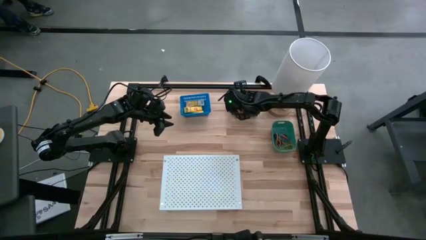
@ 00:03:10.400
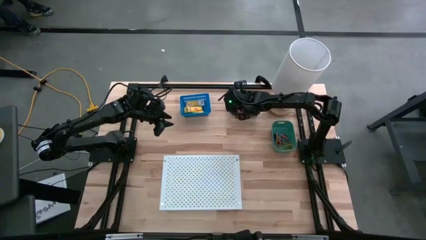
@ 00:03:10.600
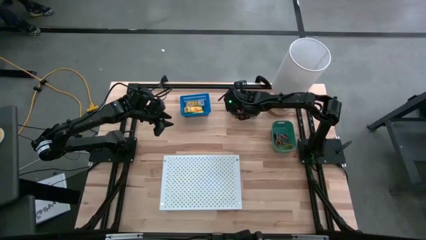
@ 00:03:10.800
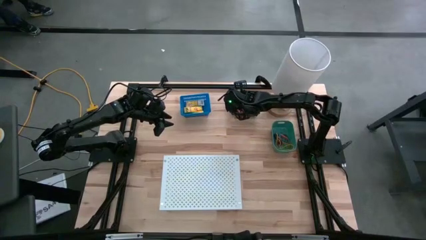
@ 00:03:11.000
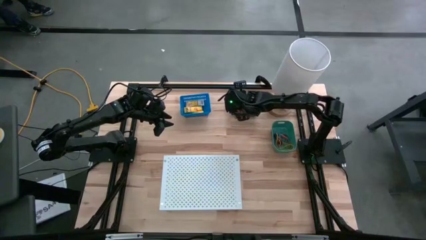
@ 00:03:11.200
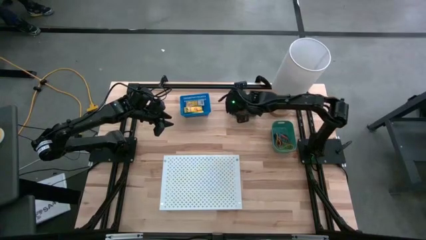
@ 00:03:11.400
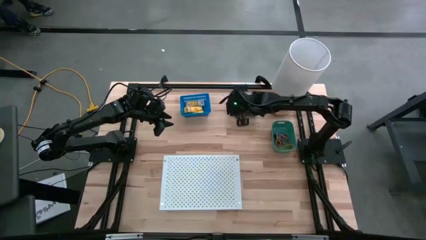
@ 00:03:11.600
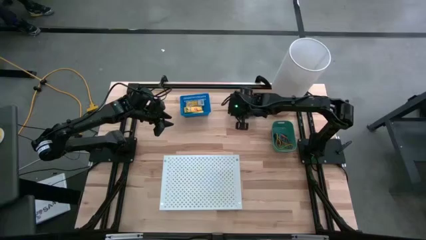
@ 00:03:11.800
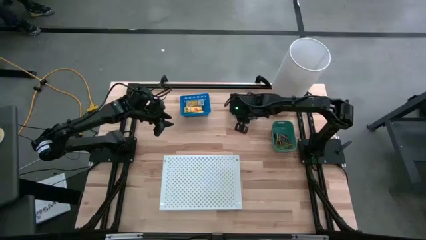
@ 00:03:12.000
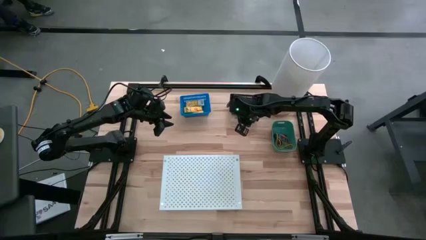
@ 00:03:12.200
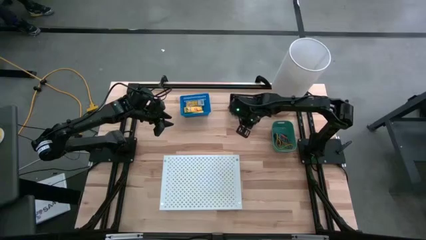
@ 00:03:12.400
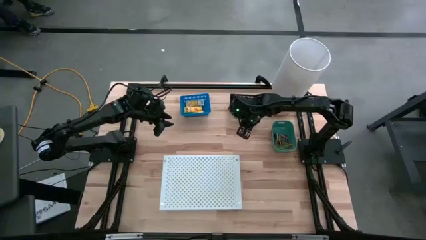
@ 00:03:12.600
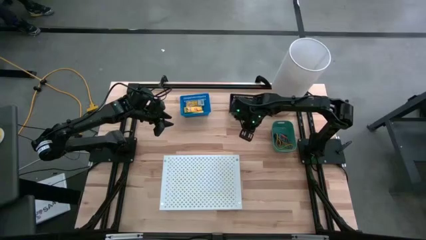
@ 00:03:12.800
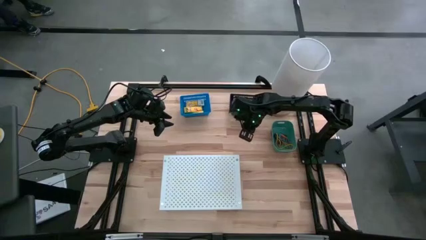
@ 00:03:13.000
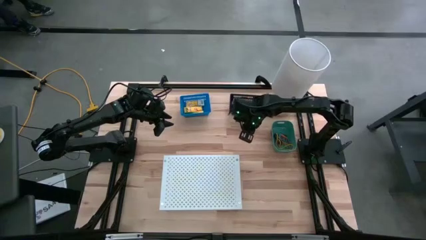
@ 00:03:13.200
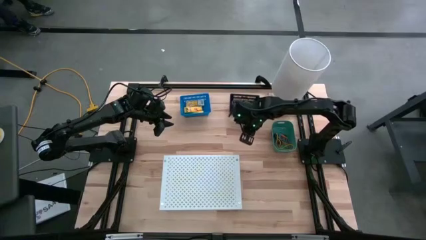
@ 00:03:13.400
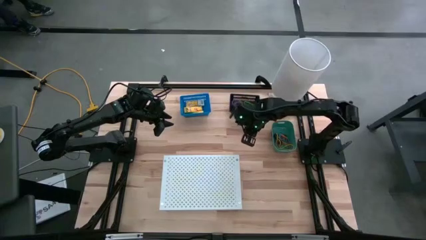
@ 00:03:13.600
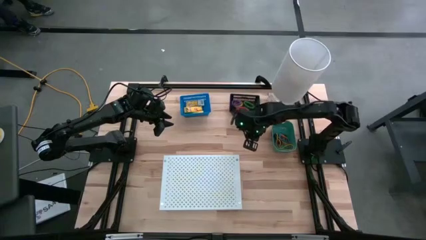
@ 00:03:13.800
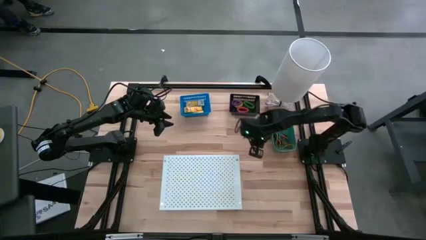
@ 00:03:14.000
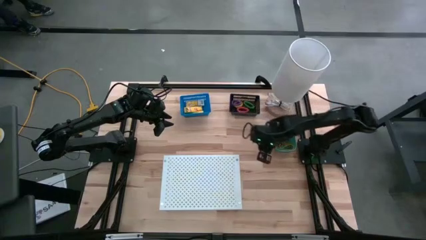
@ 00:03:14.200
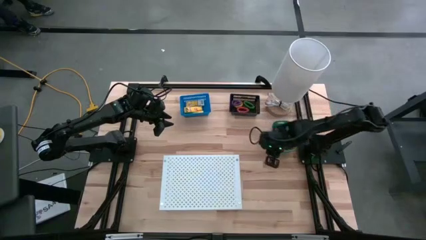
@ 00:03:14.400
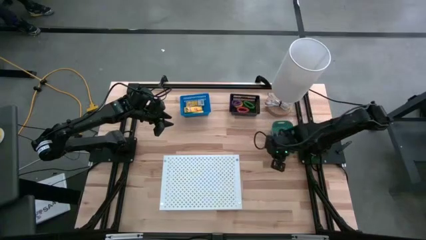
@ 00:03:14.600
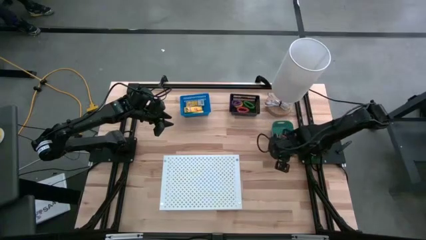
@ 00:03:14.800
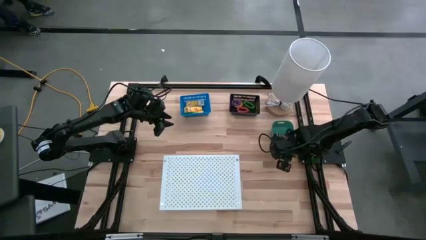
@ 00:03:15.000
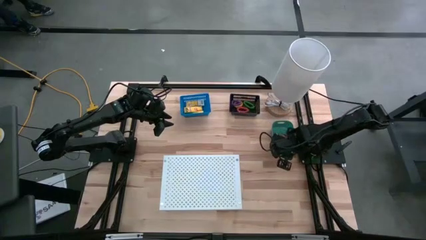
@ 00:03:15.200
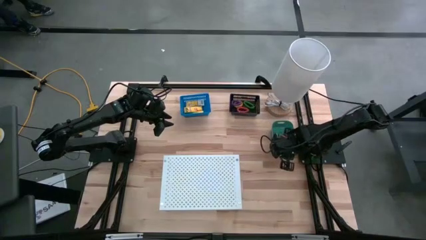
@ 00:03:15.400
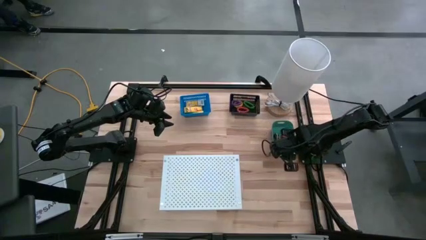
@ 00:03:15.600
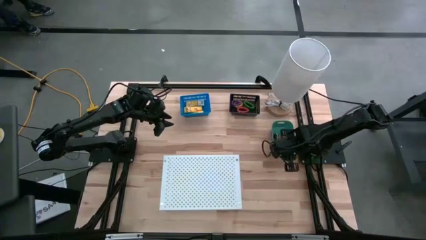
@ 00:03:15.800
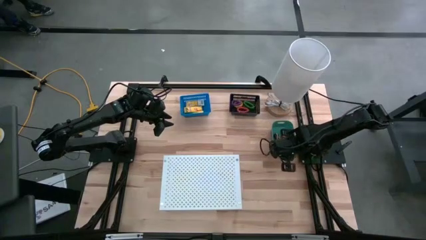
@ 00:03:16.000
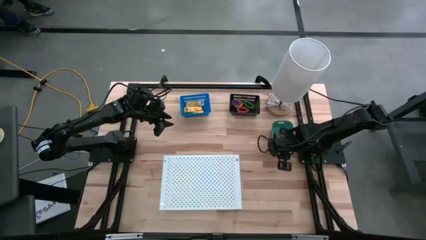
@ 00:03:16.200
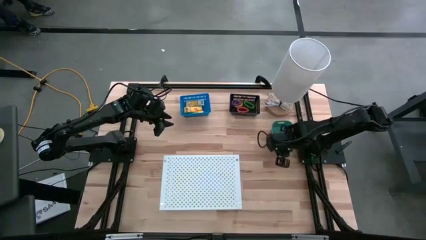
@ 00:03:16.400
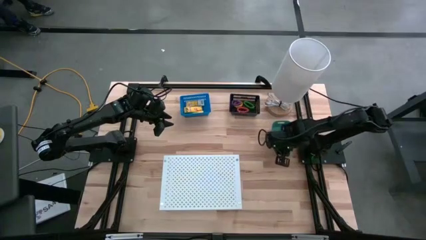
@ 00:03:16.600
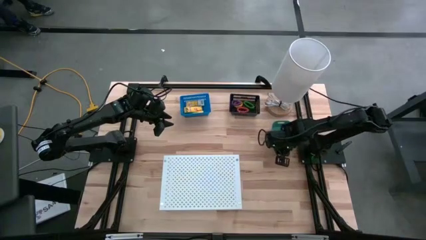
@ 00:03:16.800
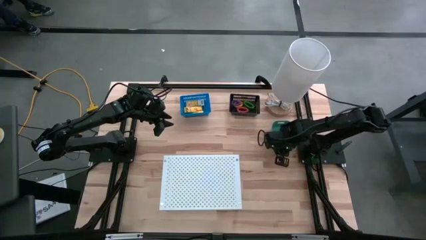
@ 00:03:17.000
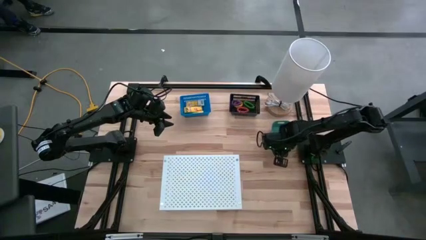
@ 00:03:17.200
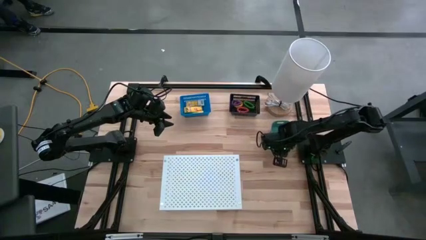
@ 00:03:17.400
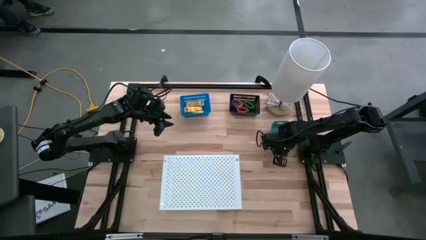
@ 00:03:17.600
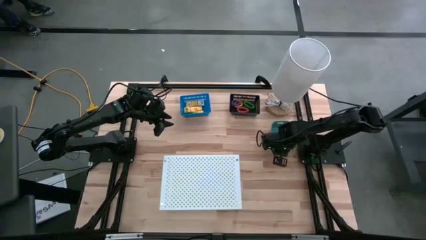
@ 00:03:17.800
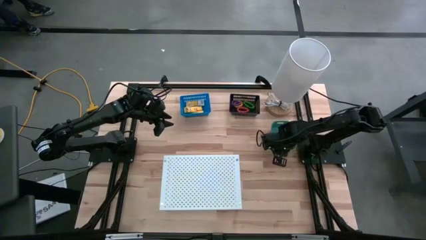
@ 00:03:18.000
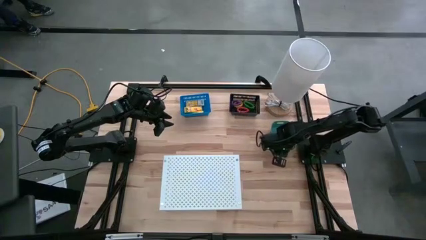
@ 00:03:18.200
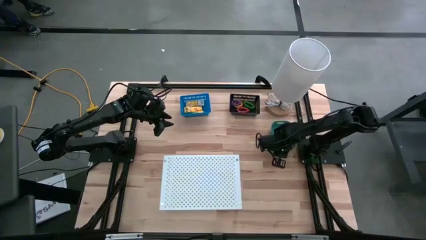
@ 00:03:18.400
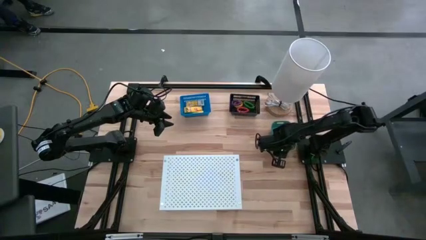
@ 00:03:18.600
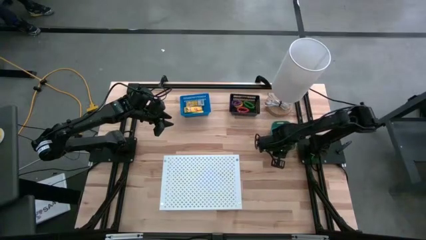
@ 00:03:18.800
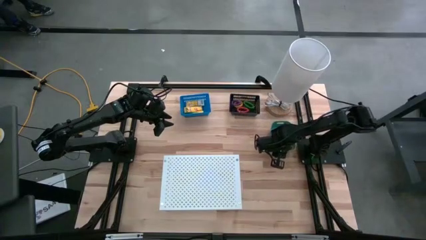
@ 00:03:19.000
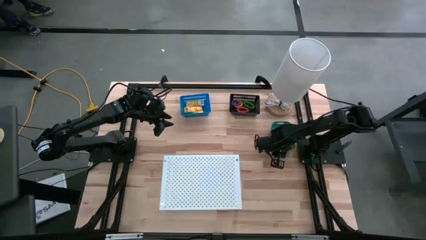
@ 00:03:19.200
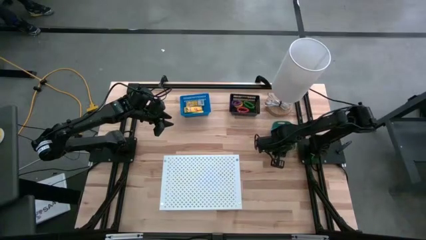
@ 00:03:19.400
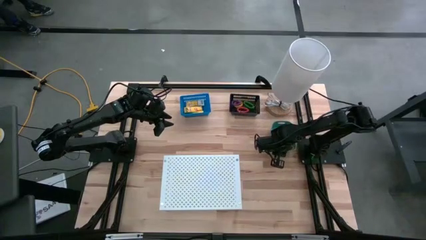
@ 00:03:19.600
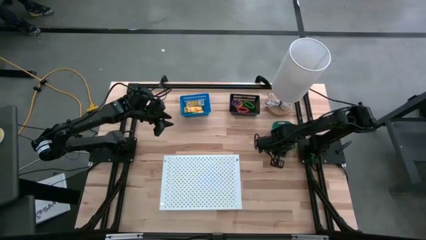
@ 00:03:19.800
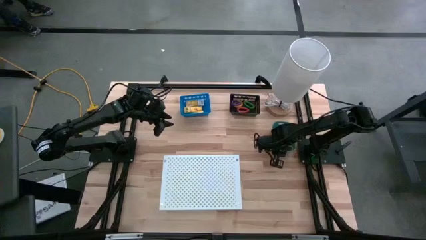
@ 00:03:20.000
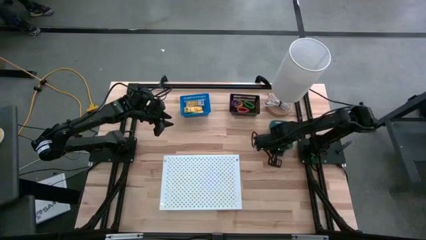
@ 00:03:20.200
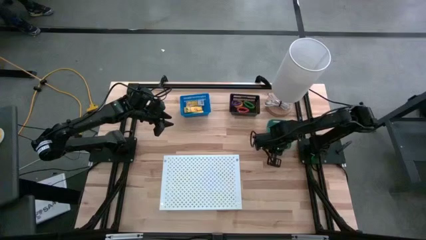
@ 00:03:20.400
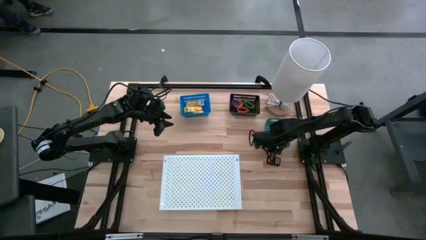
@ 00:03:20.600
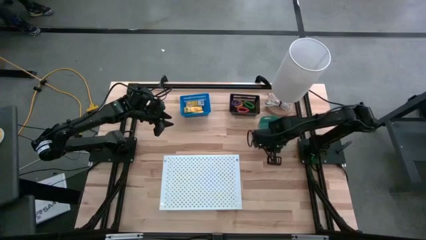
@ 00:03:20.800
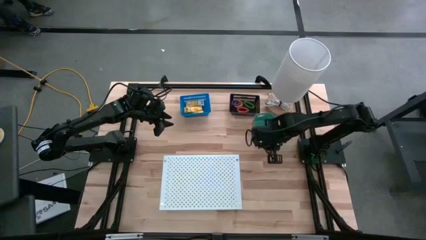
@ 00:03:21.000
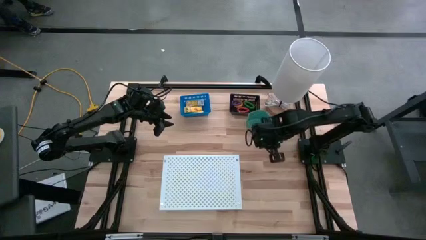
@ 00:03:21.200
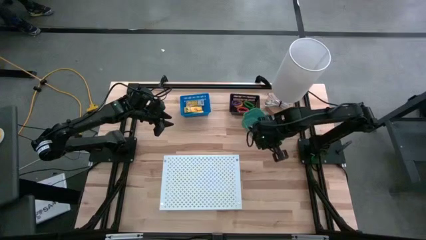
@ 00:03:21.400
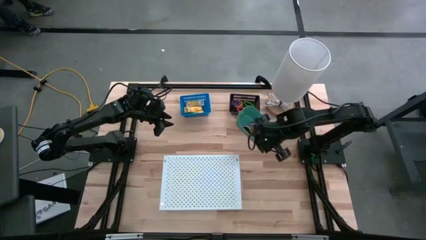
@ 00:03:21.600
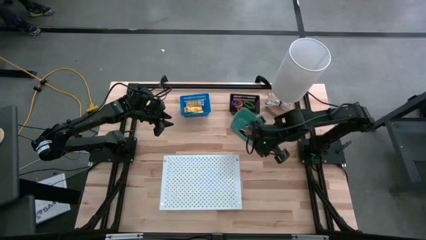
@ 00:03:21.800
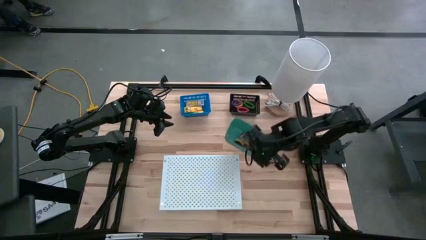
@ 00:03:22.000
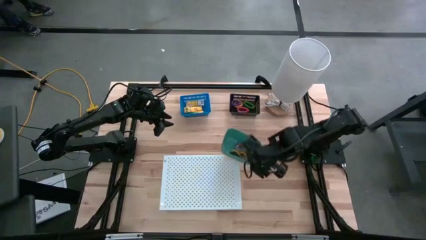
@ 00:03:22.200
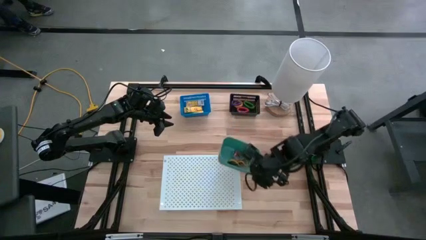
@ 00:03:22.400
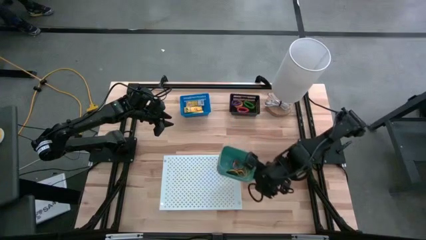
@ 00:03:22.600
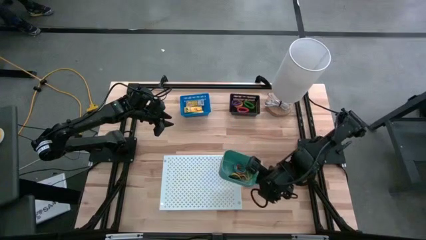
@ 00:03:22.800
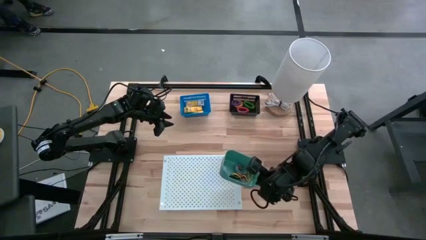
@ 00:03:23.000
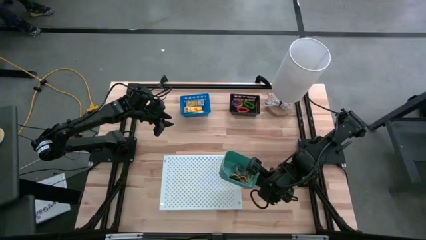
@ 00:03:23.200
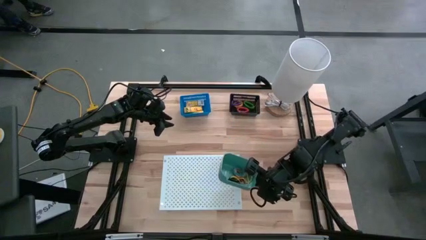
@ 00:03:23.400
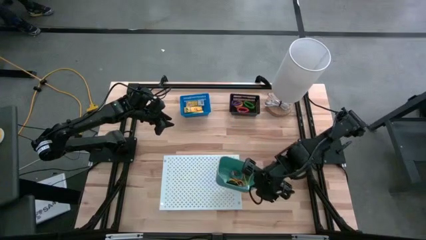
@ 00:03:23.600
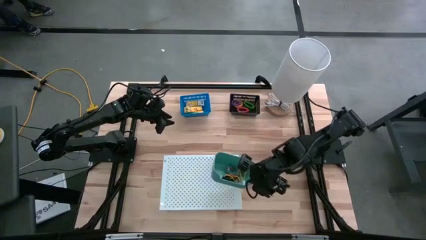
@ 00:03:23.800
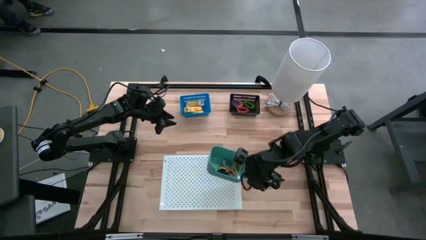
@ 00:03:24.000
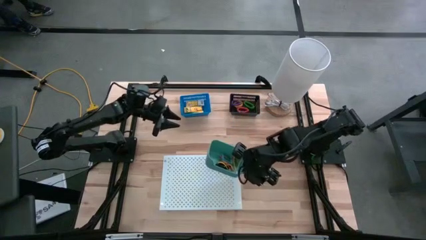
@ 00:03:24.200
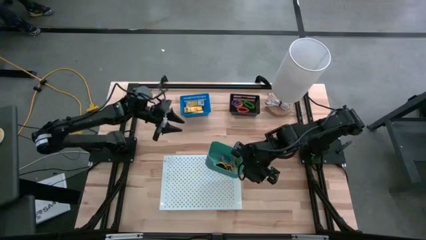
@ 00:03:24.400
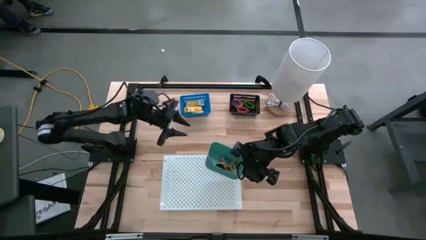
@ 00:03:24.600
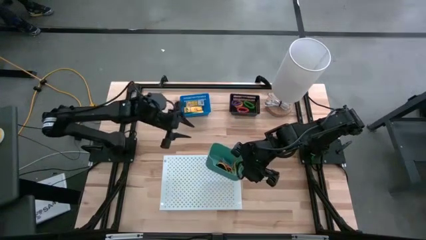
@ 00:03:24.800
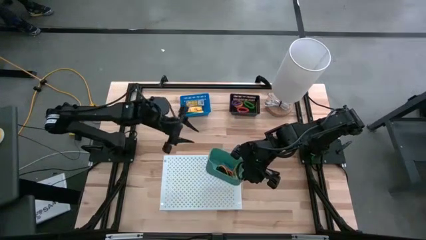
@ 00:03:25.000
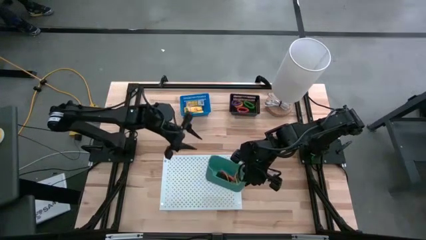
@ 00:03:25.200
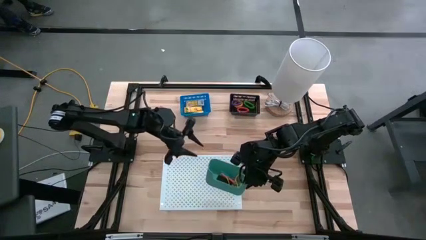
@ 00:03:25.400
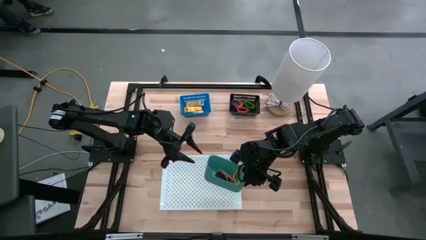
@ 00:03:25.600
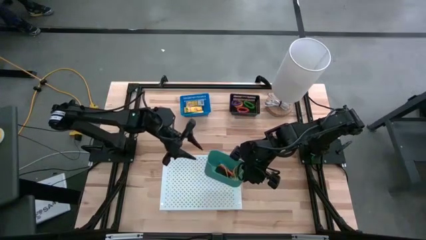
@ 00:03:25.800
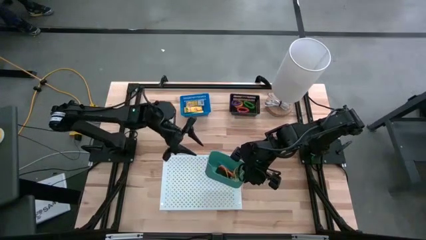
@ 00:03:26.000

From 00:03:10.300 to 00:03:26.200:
Task: Pick & Place Office Desk Supplies
Put the green bin on the shelf
